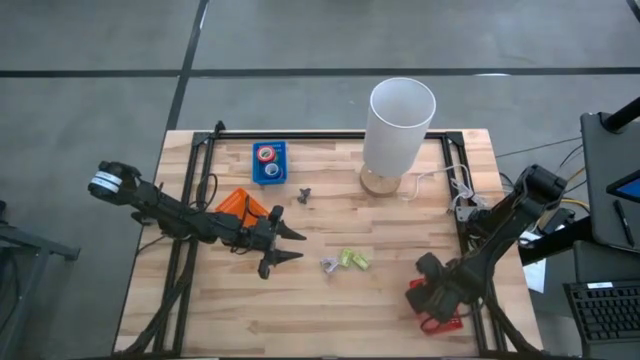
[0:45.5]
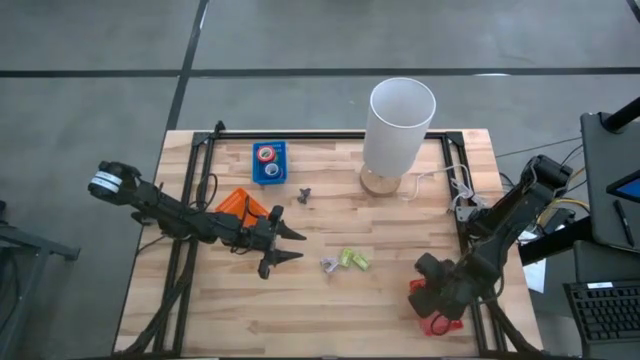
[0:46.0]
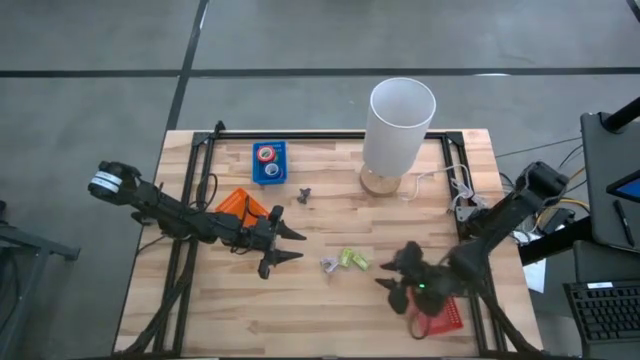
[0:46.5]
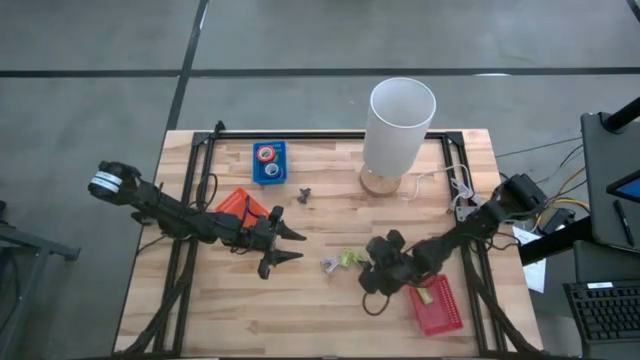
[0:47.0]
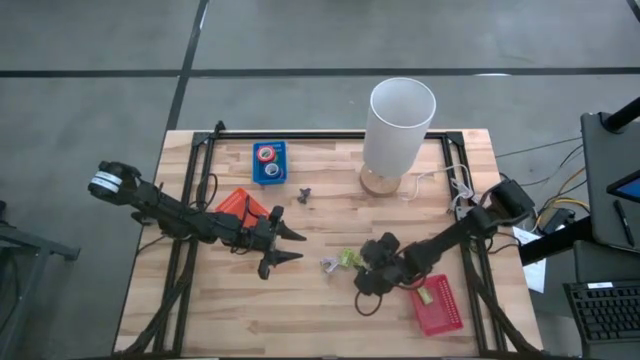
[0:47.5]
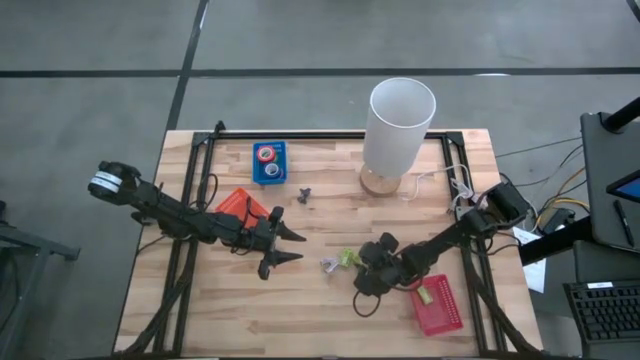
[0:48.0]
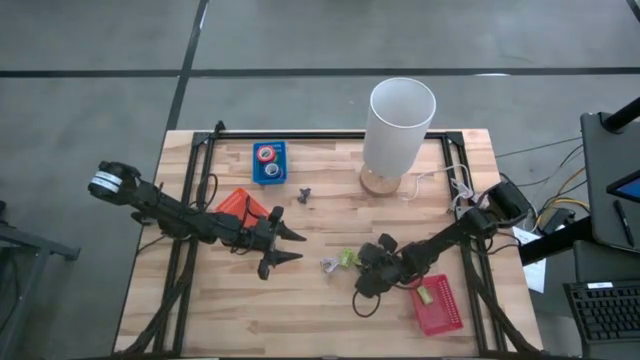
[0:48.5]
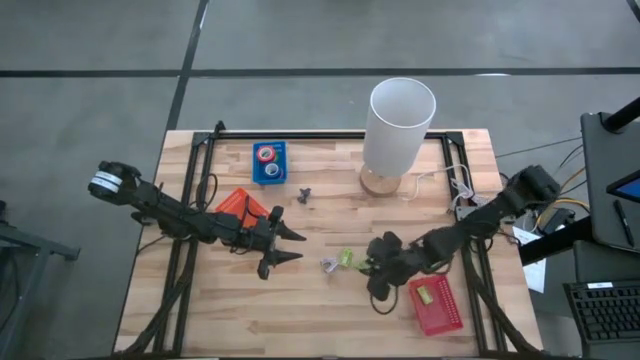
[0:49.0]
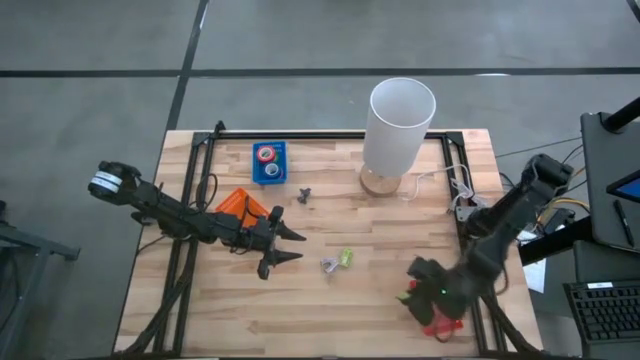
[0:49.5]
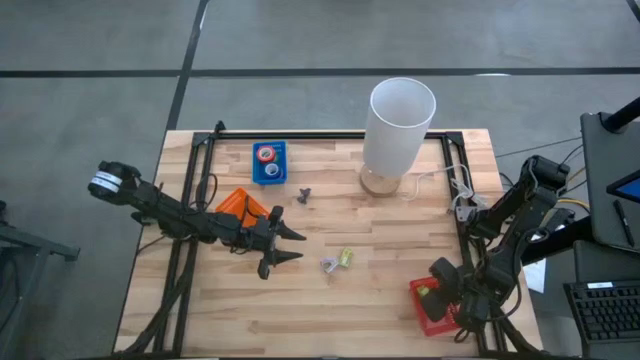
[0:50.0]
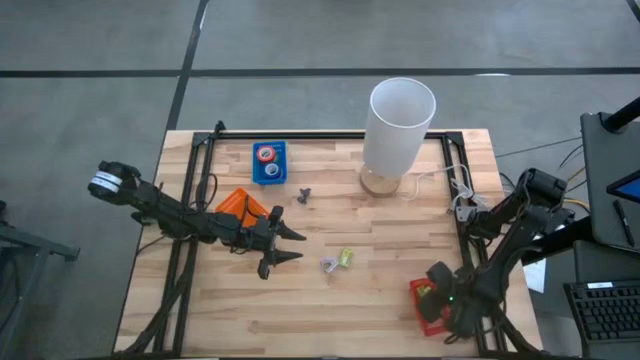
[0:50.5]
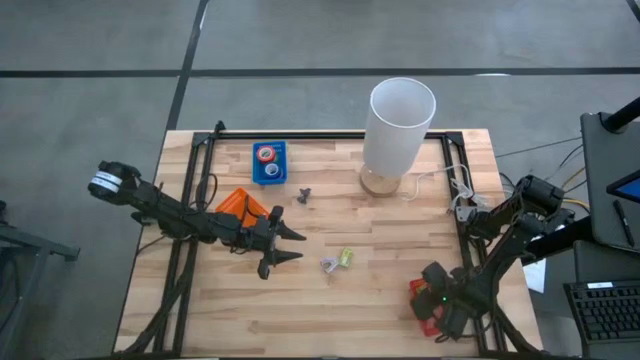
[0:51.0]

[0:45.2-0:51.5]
Task: Pick and place Stapler, Stapler remover, tape
Stack the right green stapler box on top of the other green stapler box in the red bin

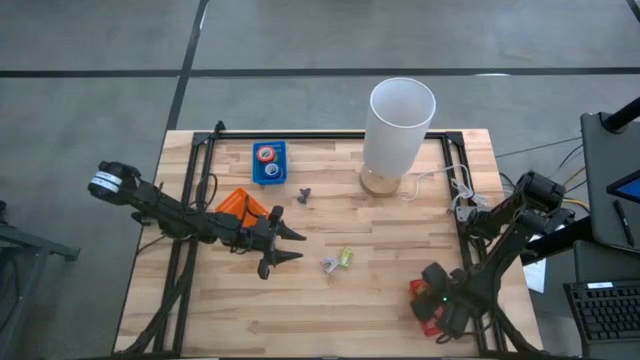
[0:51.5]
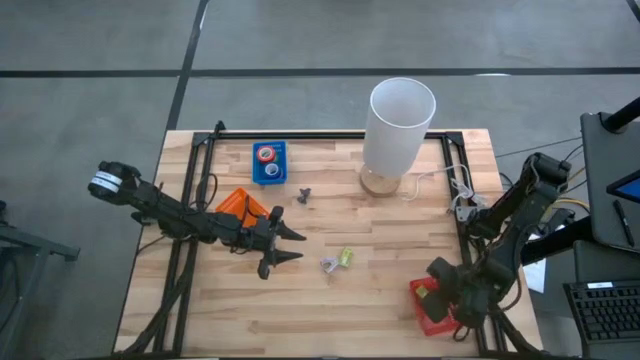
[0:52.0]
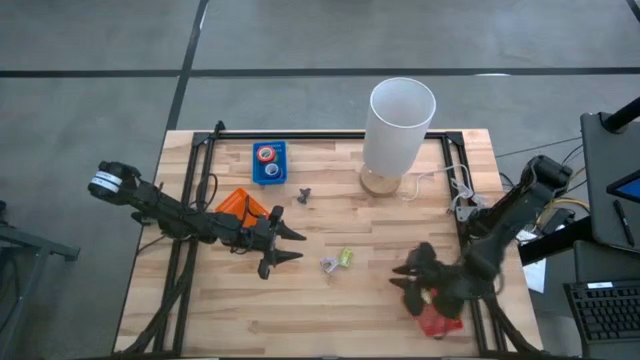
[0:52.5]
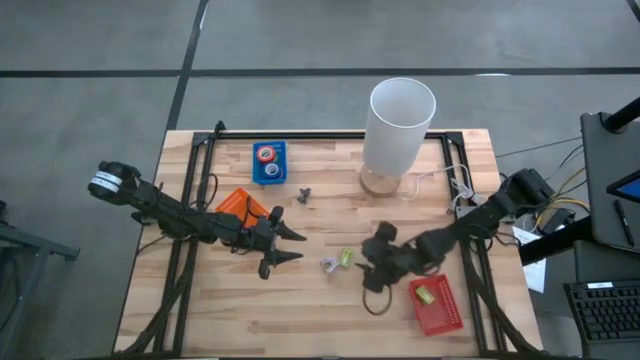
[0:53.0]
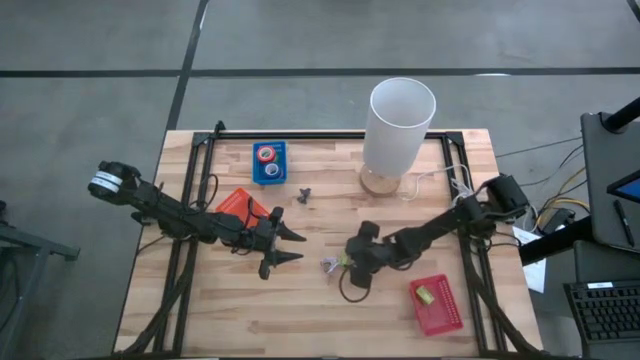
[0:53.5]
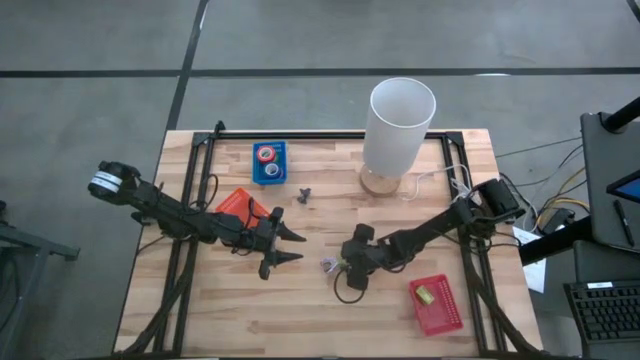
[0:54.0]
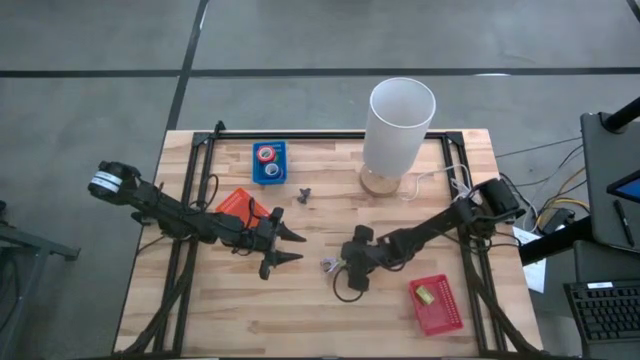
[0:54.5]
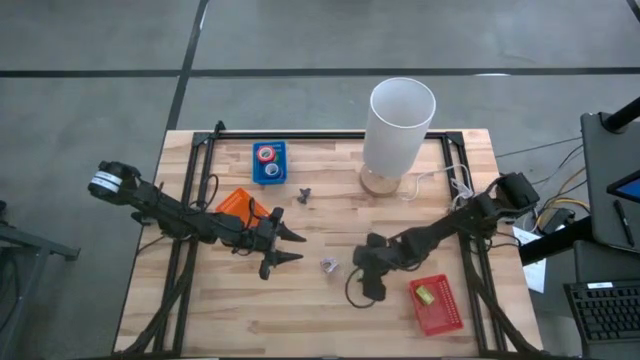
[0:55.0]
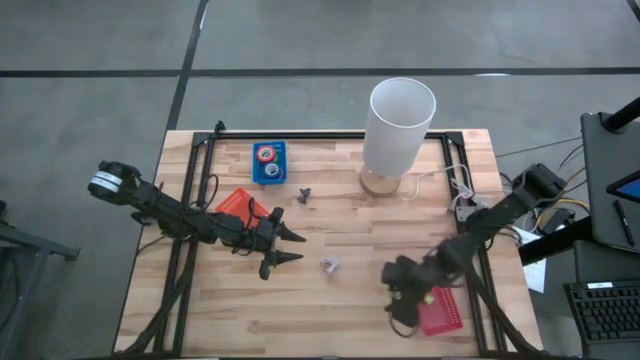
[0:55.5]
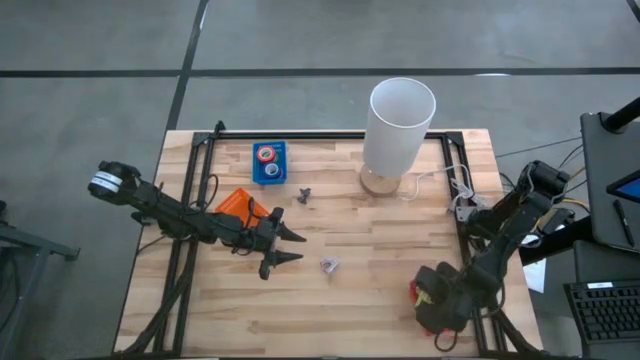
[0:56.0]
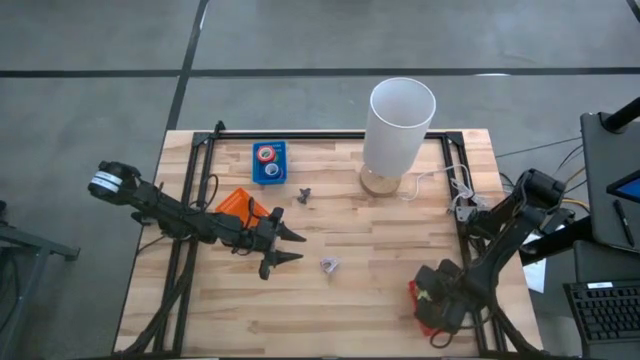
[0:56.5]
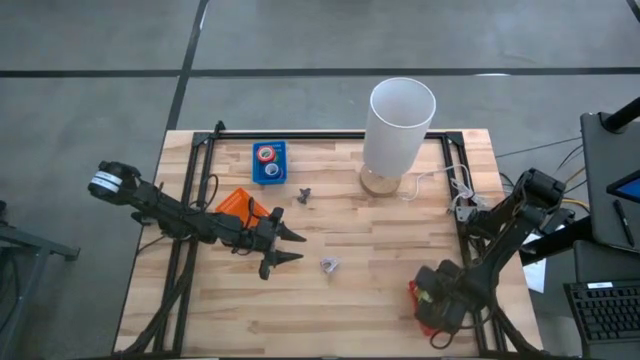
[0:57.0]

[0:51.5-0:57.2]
Stack the green stapler box on top of the green stapler box into the red bin

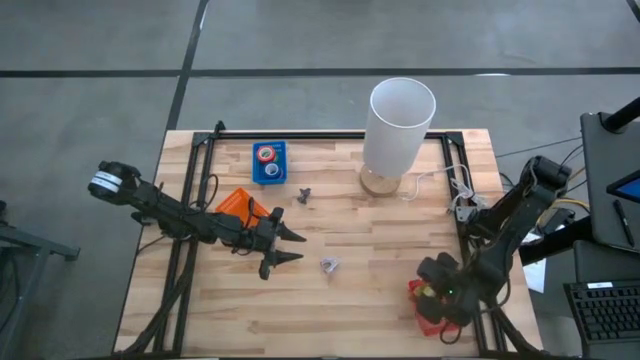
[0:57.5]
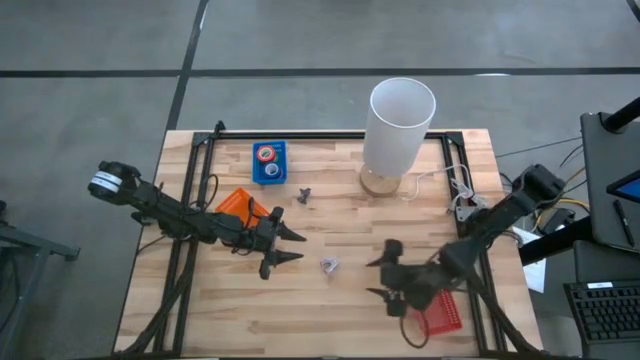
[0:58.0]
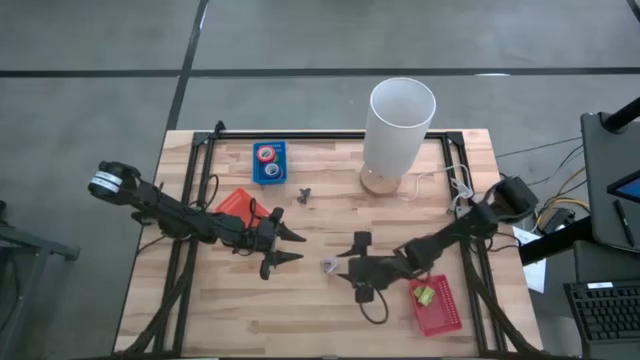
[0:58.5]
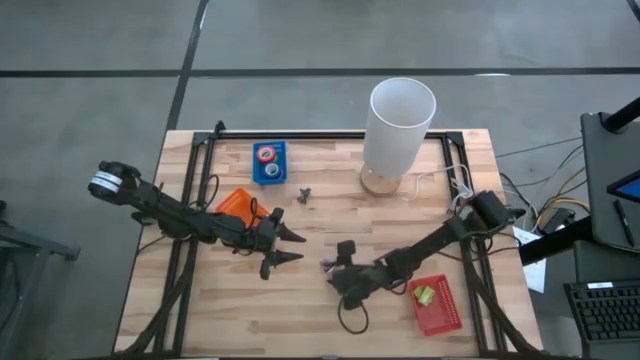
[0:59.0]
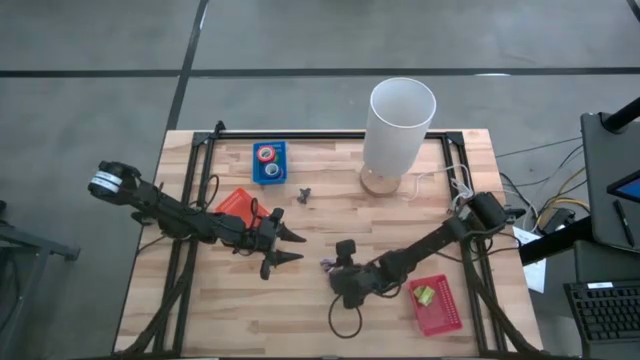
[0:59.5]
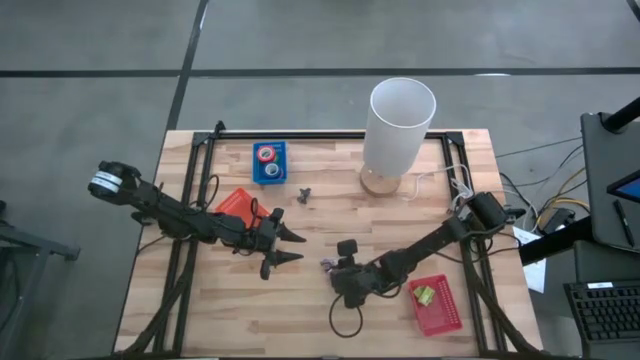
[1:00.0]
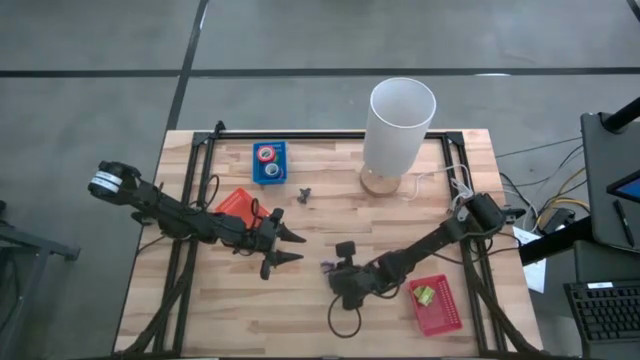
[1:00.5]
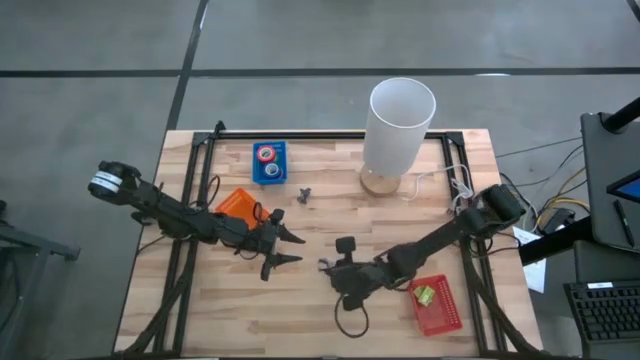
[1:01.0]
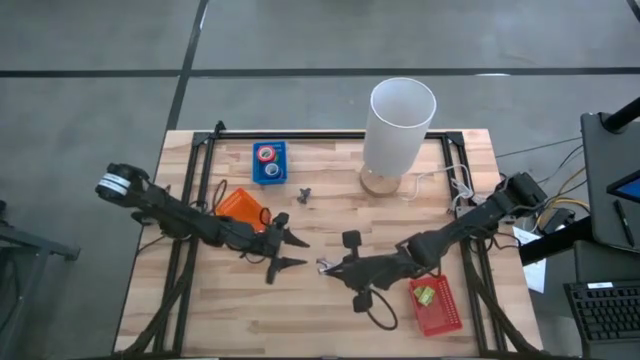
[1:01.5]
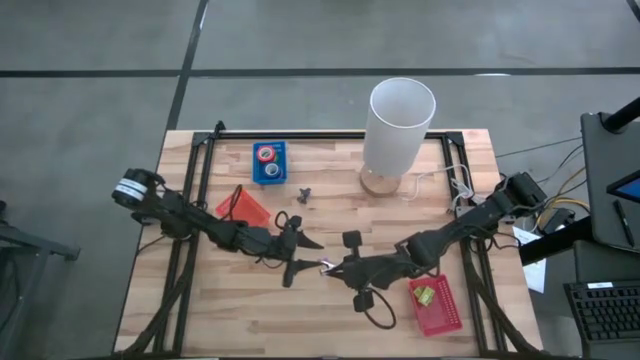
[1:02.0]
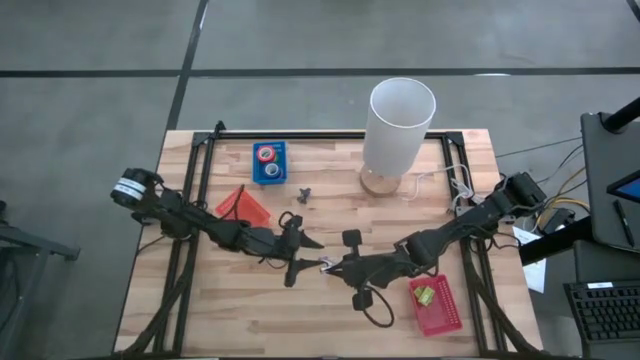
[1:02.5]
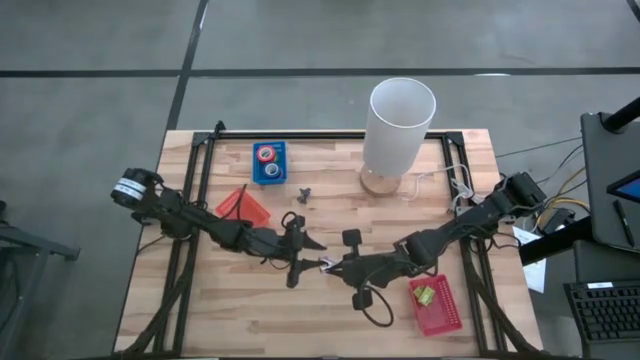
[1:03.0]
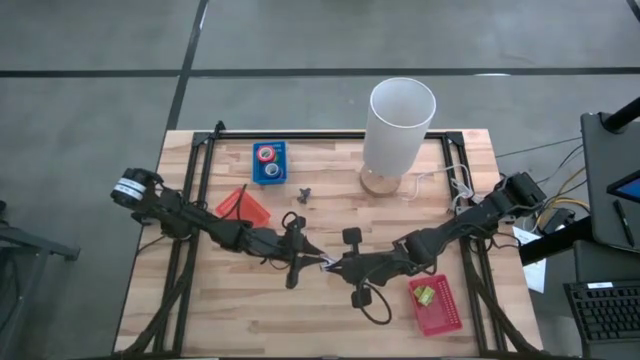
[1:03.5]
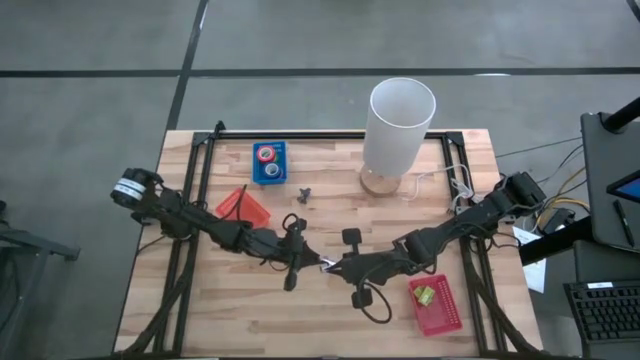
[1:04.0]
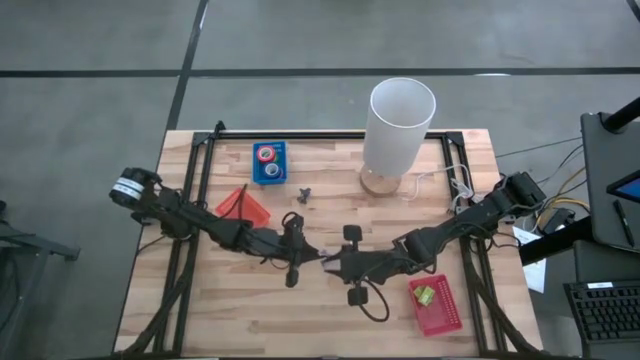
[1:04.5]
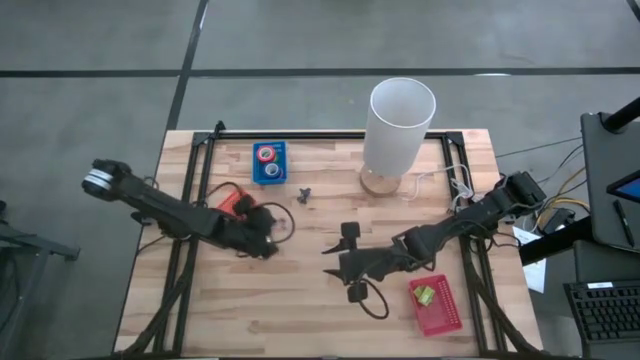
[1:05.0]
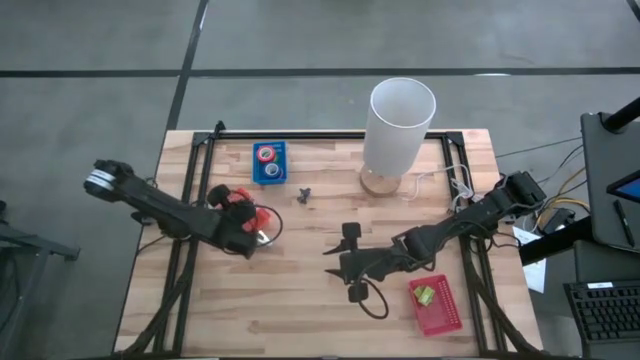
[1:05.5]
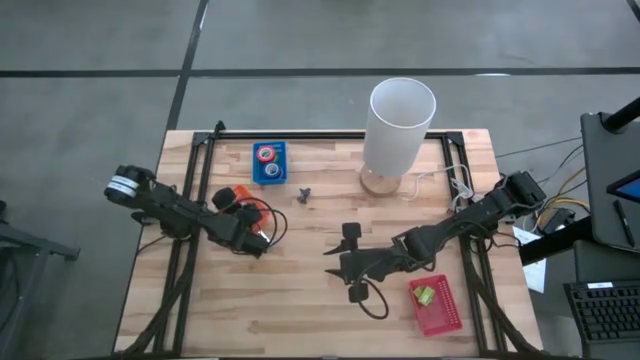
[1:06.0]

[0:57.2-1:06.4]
Put the purple staple remover into the orange bin

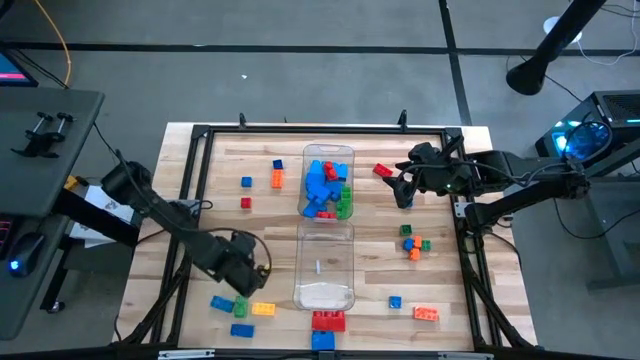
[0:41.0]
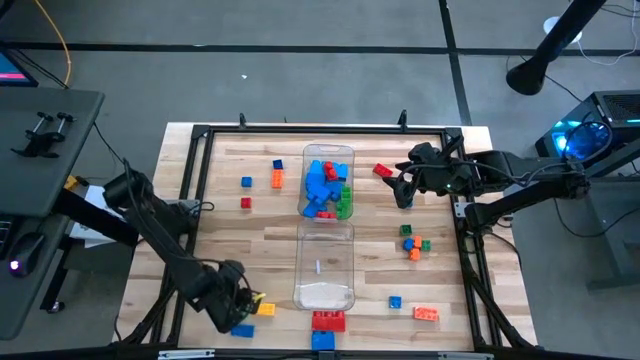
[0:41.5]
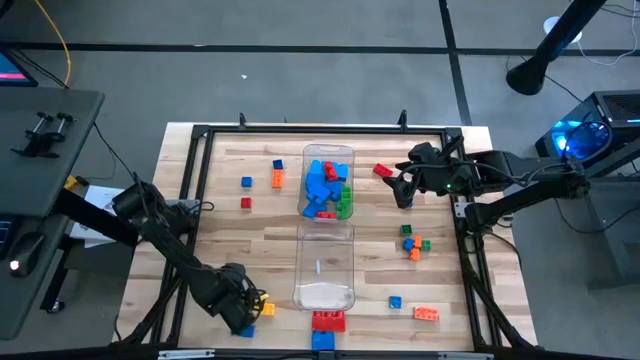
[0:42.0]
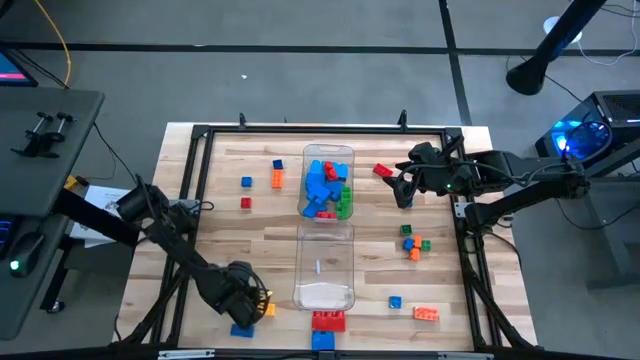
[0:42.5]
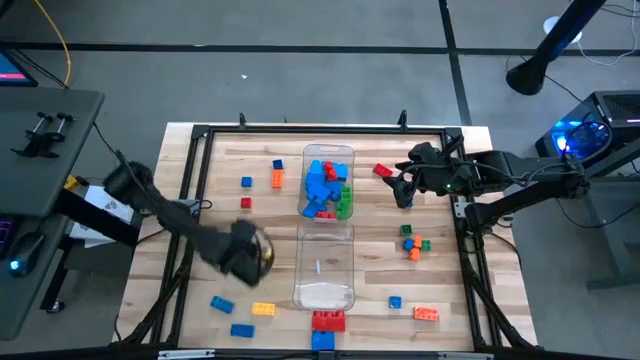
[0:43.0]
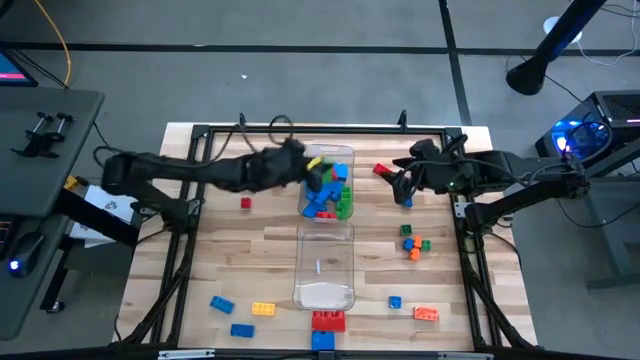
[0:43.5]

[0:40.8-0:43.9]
Task: Sort blocks by size
Put the large green game piece in the top transparent bin
